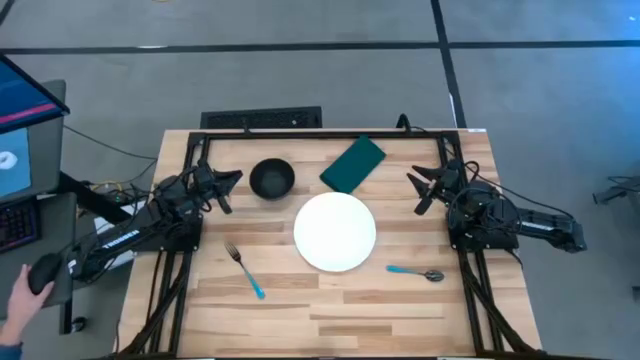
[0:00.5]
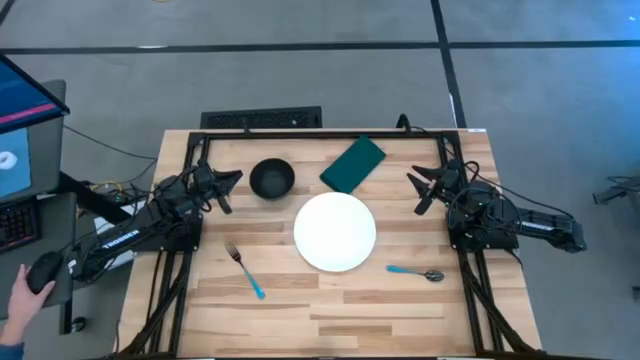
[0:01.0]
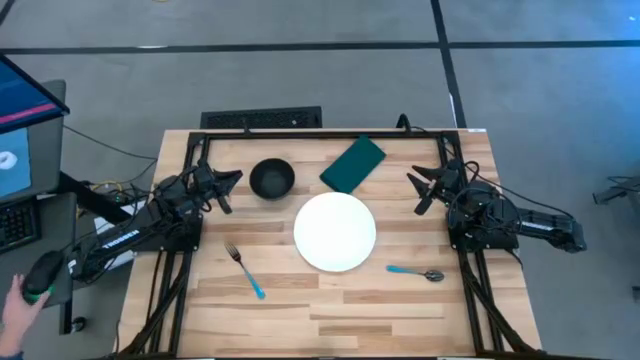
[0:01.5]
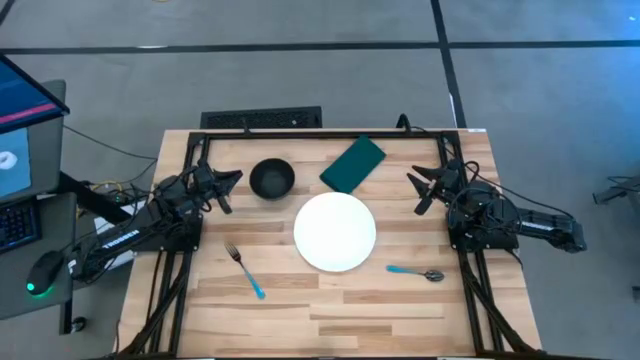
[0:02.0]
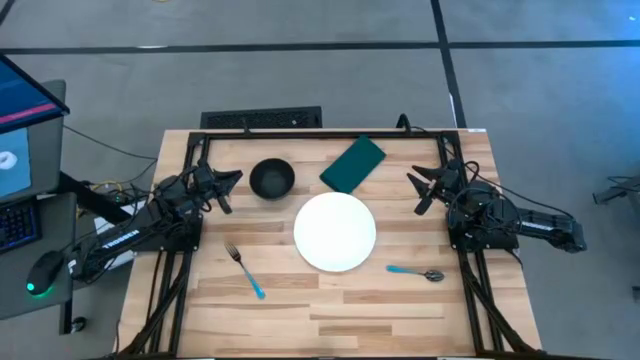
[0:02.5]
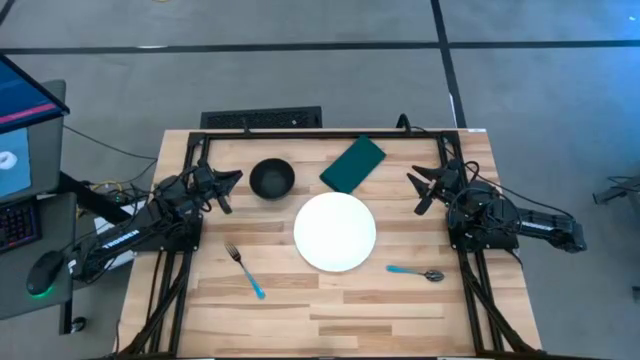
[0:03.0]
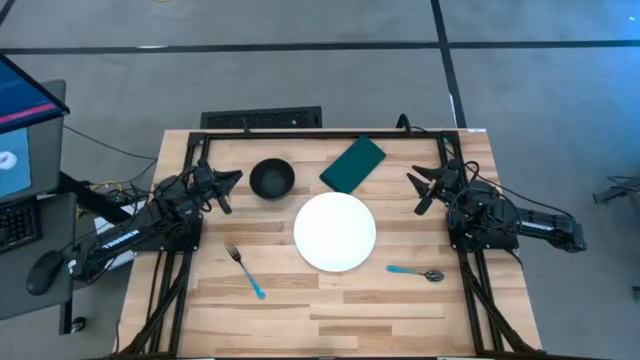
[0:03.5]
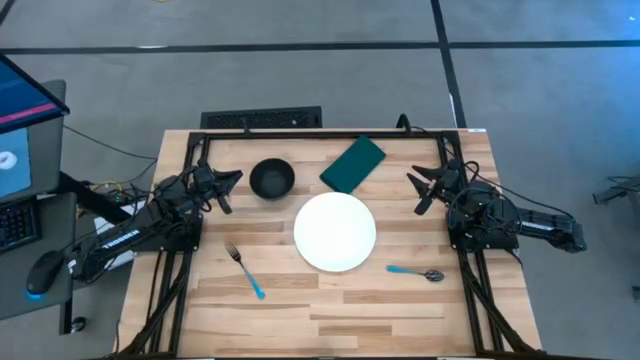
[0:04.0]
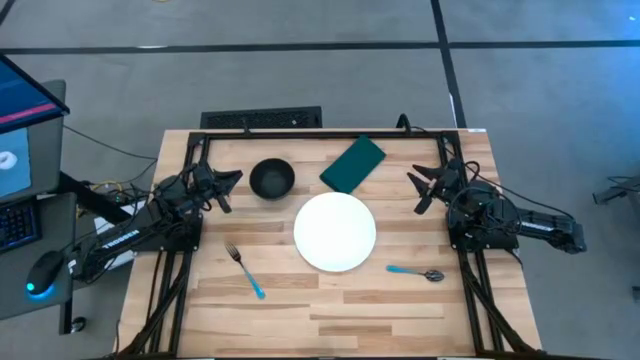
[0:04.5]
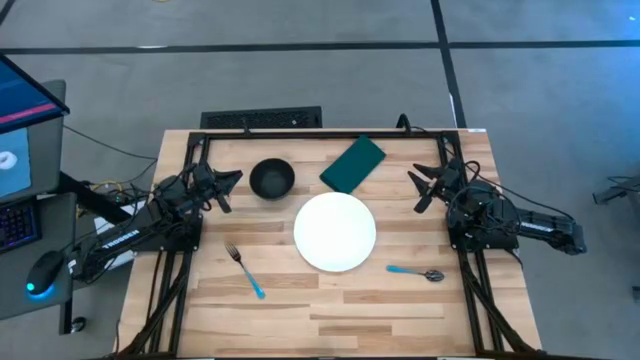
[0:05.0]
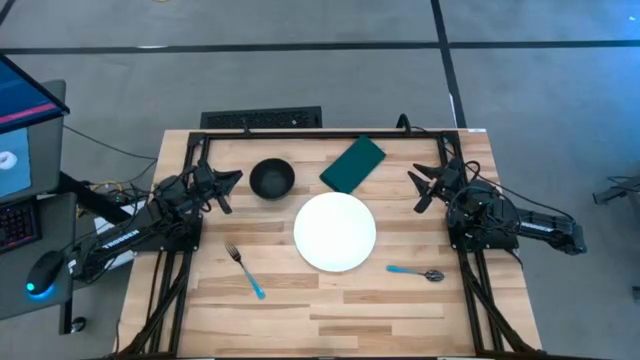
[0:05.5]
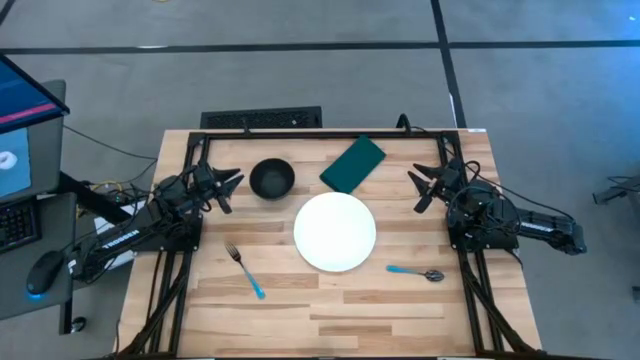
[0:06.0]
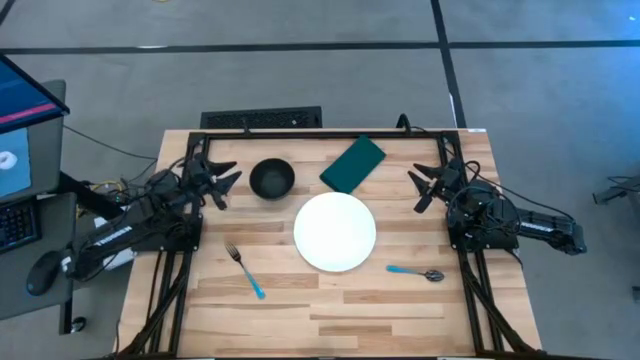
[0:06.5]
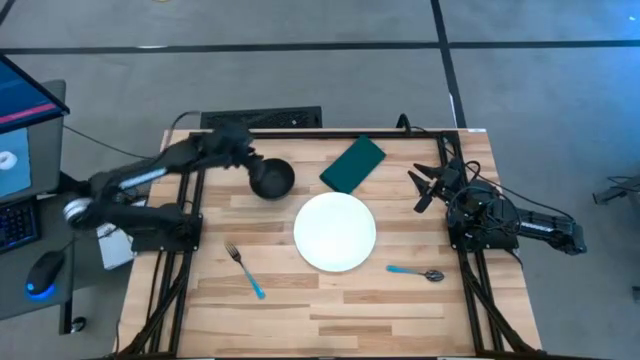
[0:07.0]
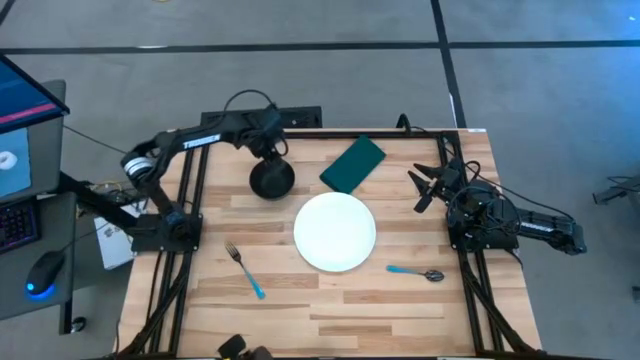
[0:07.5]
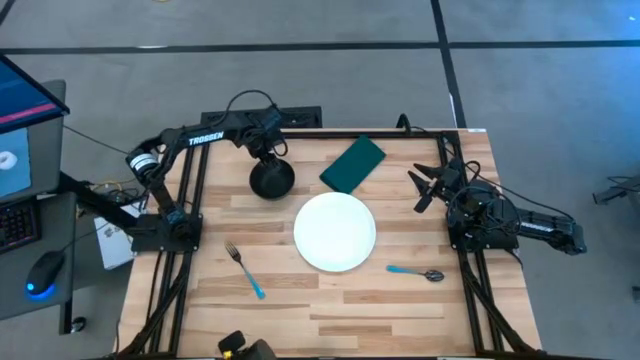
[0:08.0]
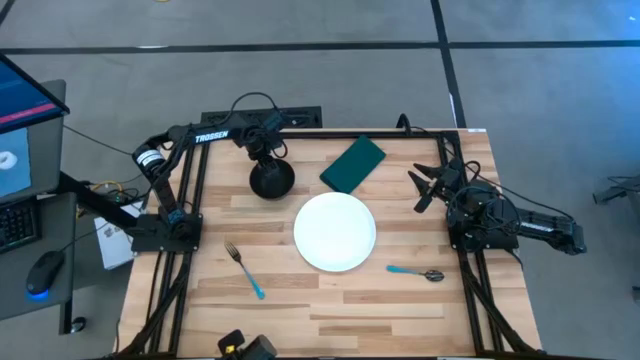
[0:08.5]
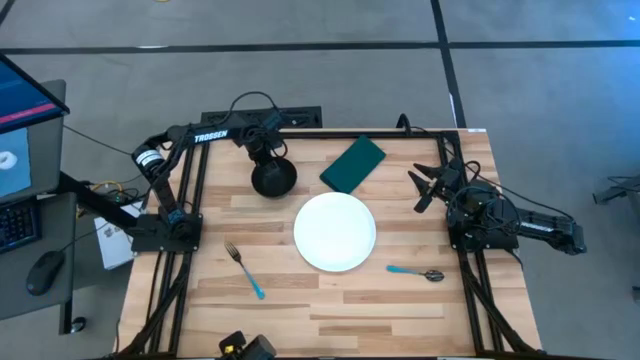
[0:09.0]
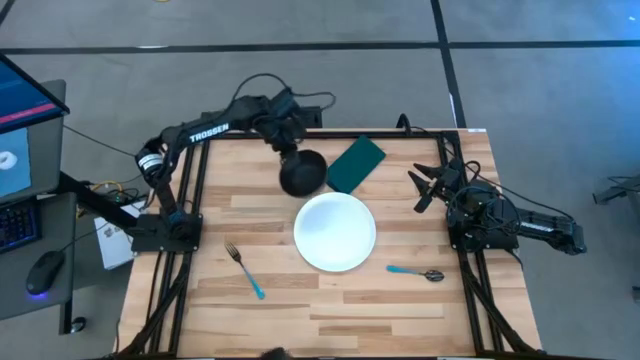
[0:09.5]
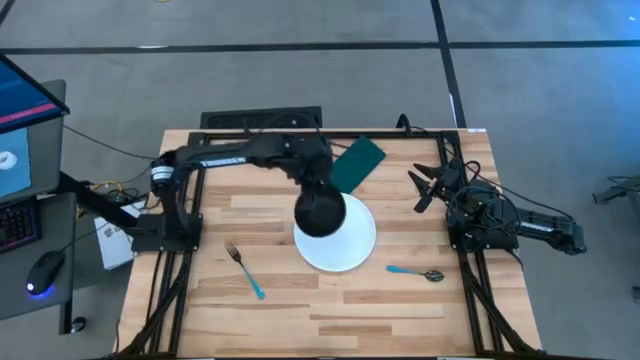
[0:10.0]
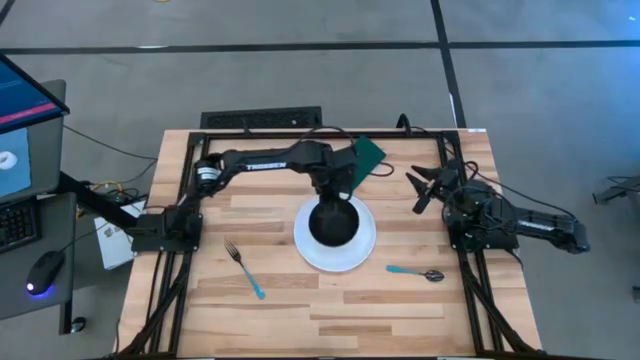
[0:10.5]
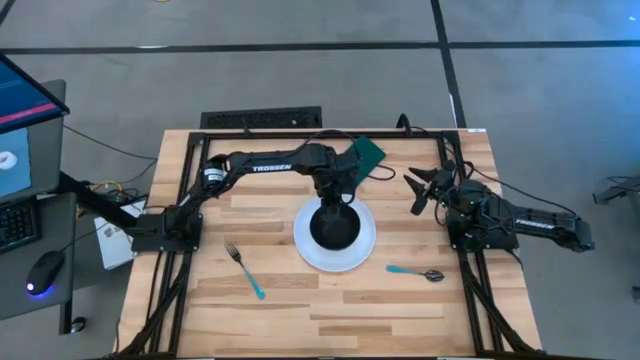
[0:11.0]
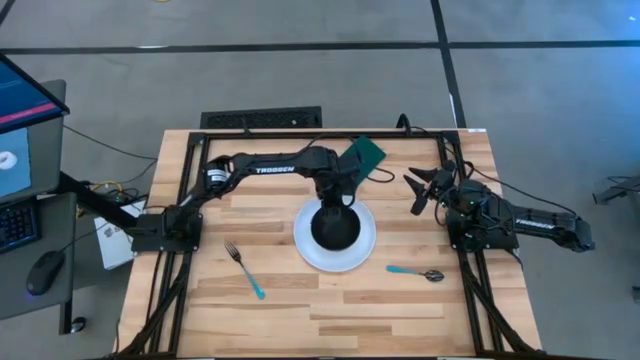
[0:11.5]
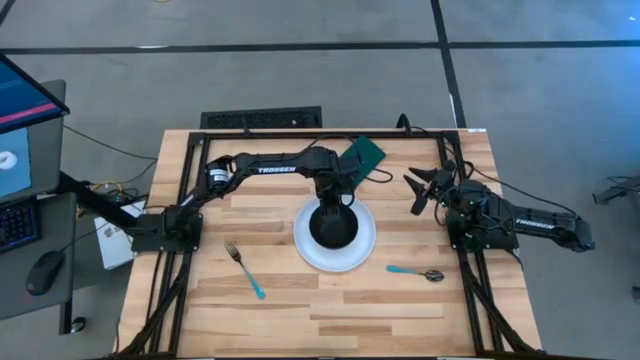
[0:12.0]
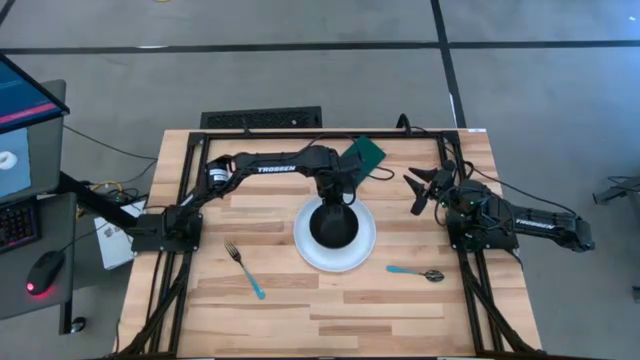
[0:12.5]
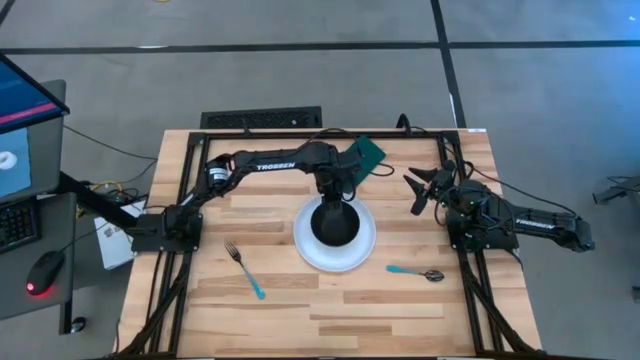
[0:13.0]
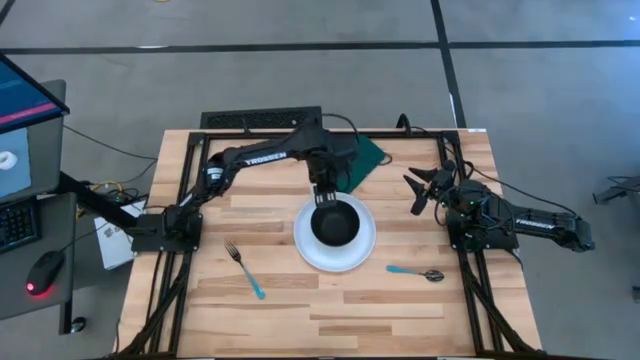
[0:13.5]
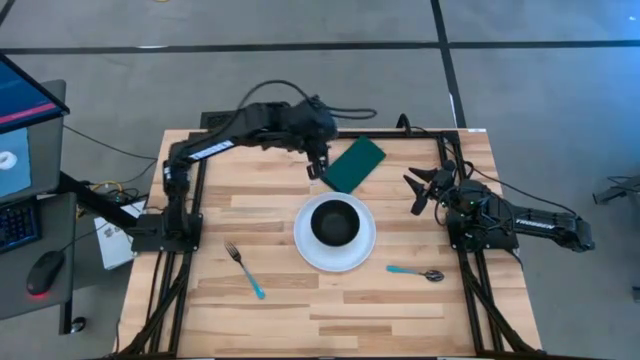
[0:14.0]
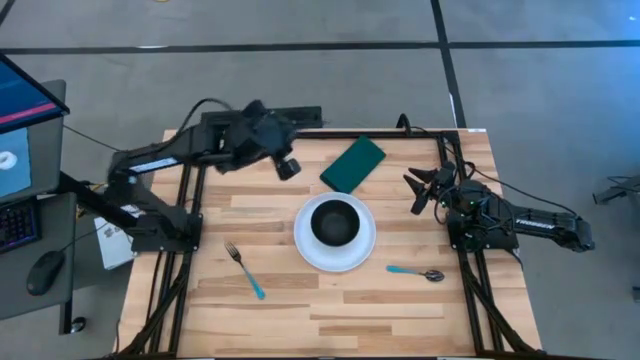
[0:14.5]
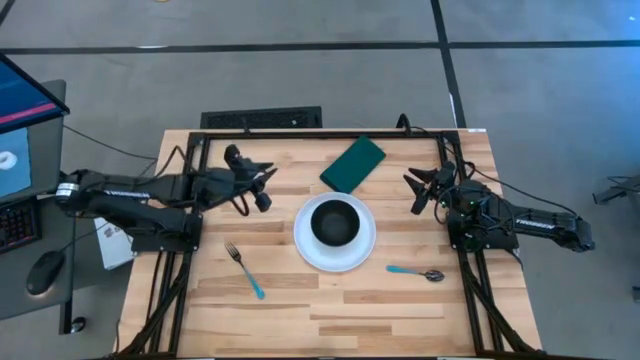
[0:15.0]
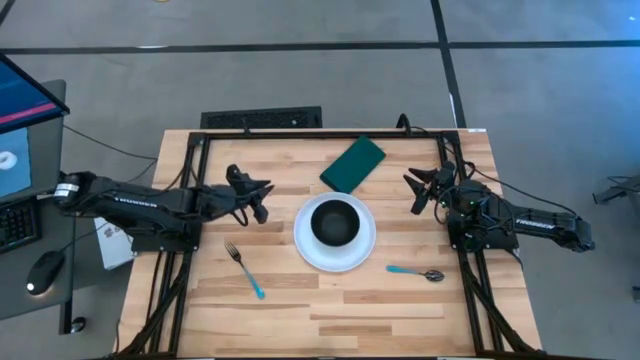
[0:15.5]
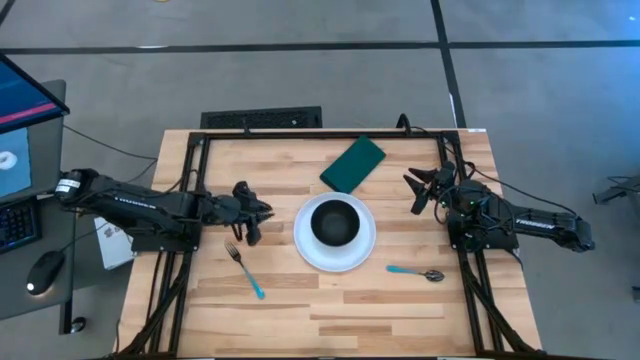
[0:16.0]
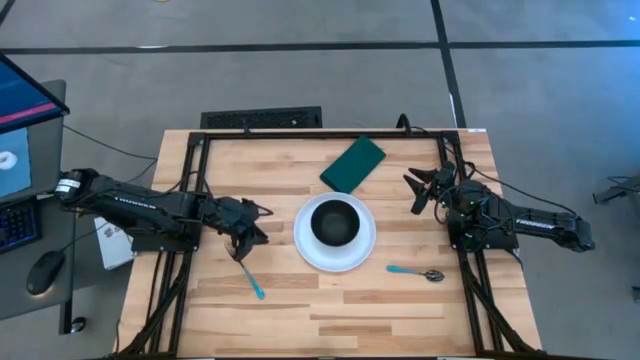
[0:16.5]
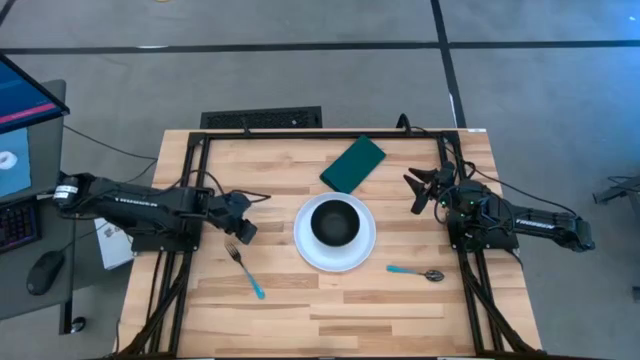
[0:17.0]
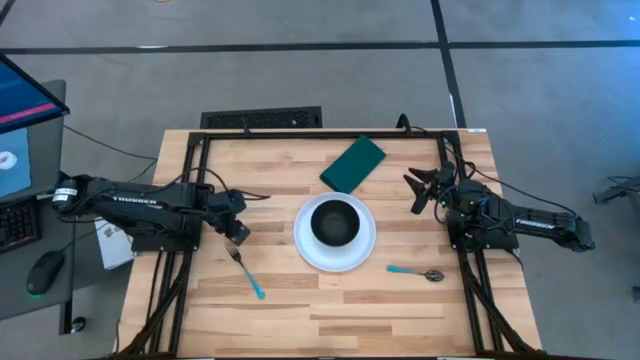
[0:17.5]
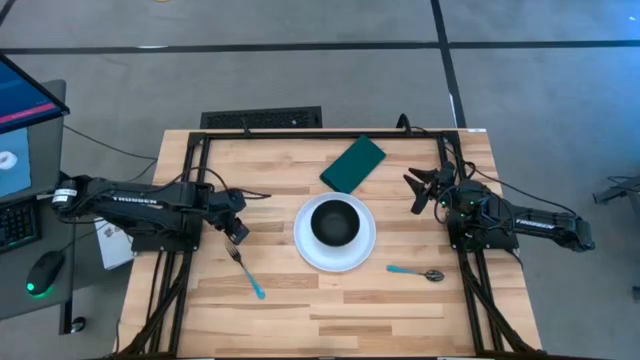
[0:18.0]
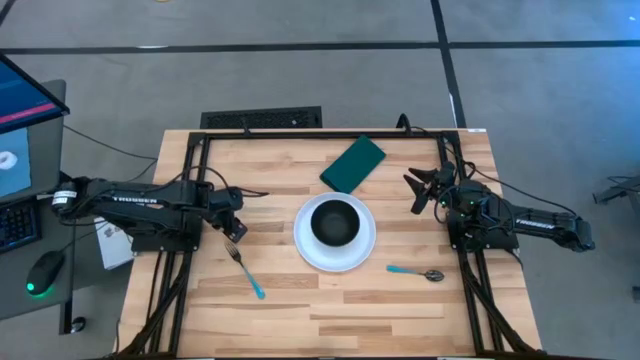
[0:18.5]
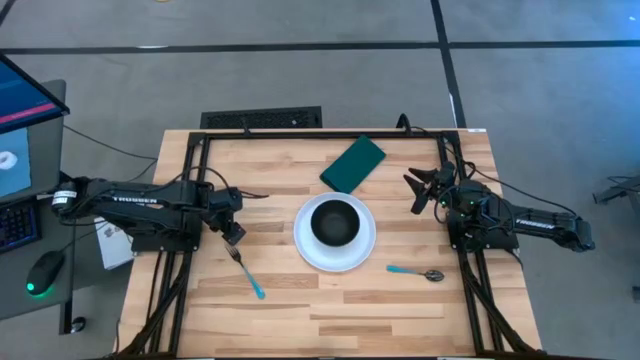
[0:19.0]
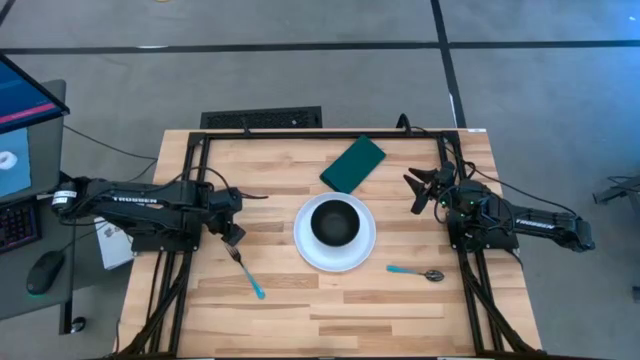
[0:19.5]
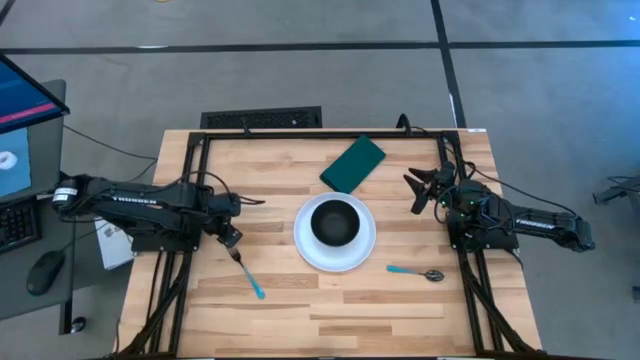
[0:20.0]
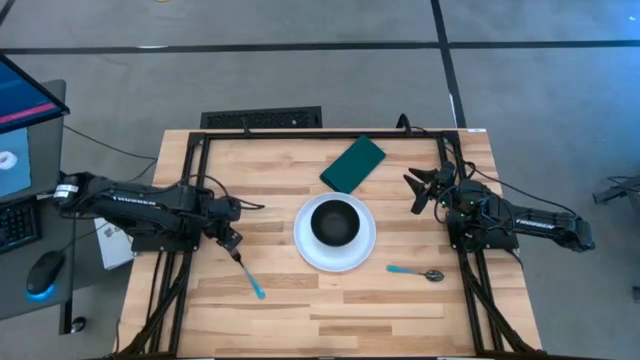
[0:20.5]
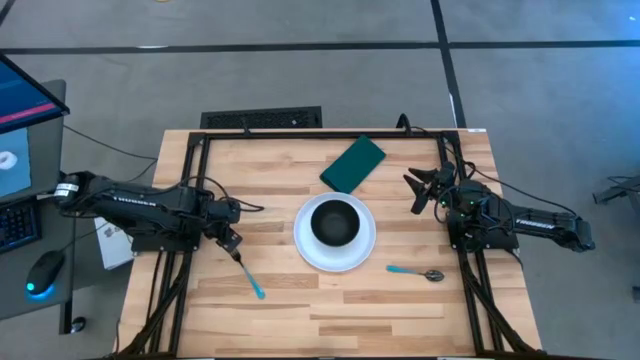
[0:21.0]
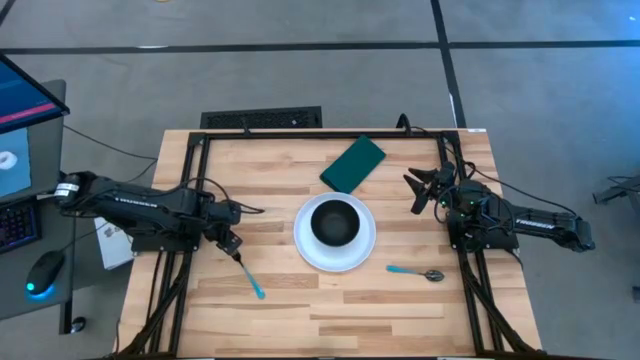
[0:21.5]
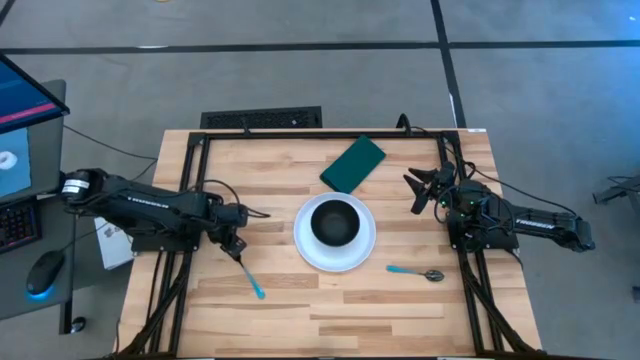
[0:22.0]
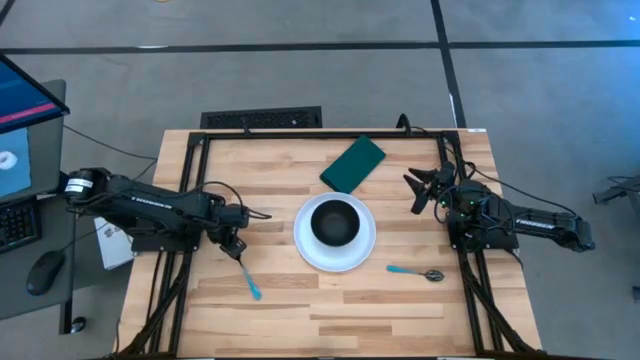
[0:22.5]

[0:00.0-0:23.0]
Task: Set table place
Put the black bowl on the white plate
